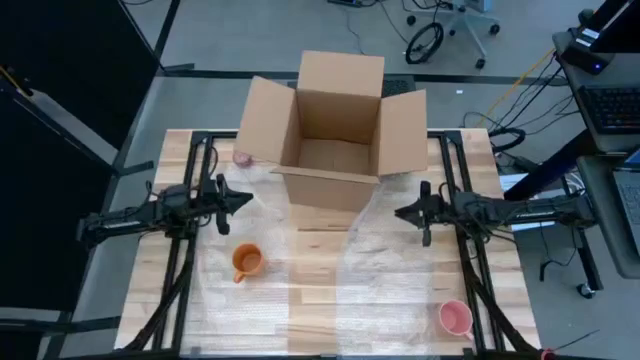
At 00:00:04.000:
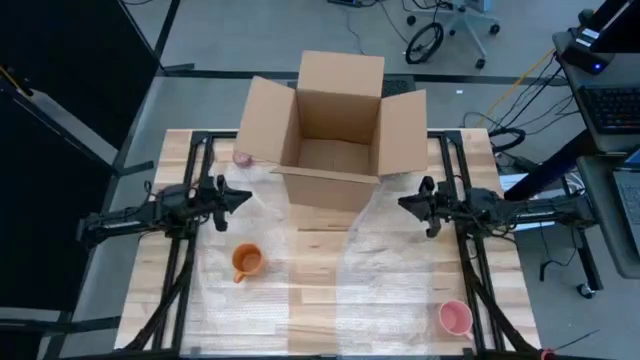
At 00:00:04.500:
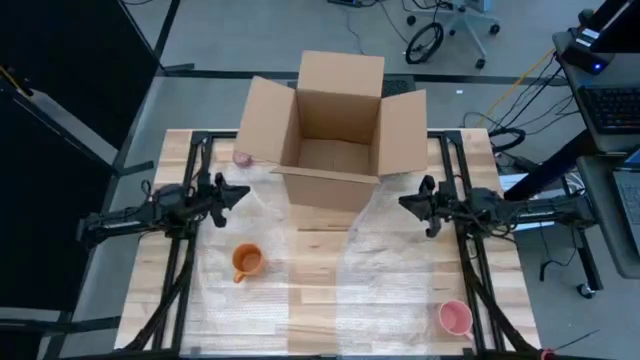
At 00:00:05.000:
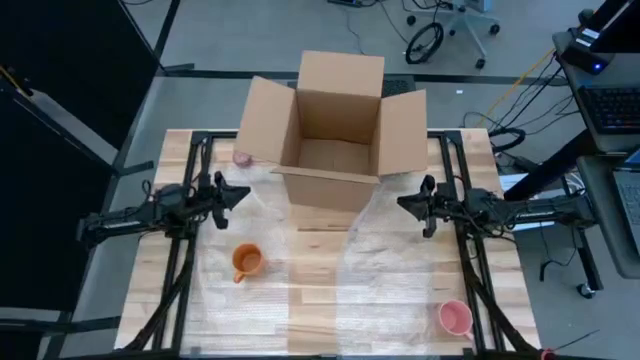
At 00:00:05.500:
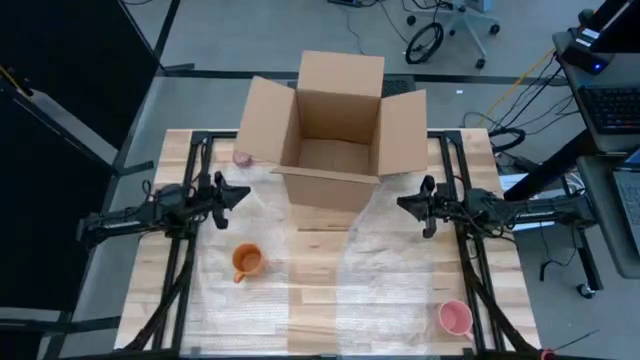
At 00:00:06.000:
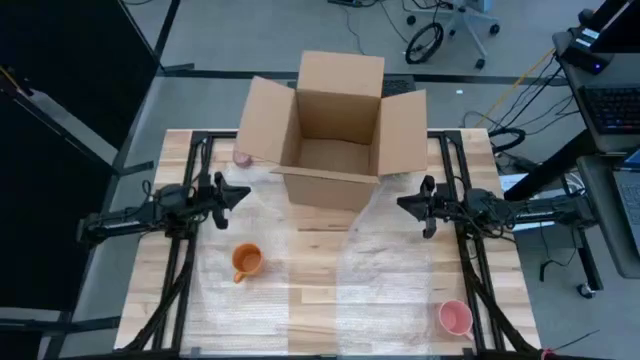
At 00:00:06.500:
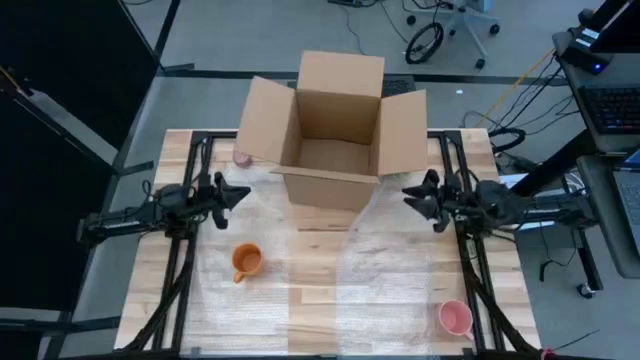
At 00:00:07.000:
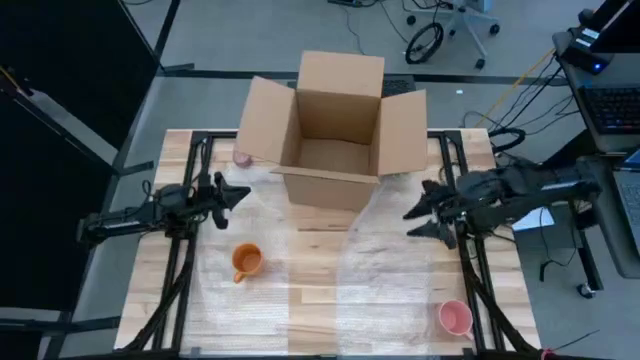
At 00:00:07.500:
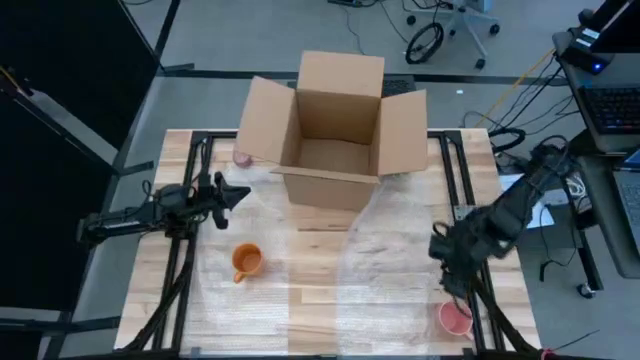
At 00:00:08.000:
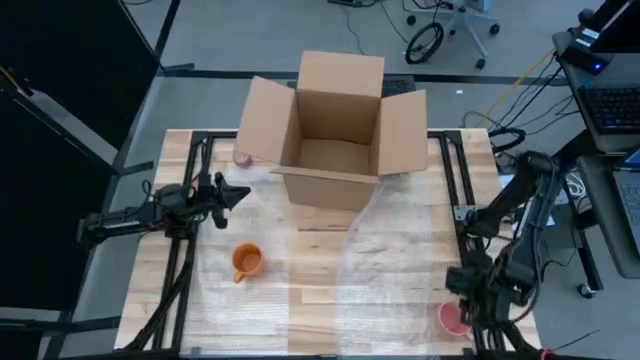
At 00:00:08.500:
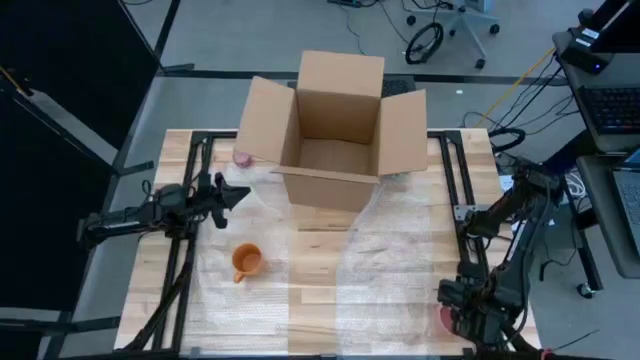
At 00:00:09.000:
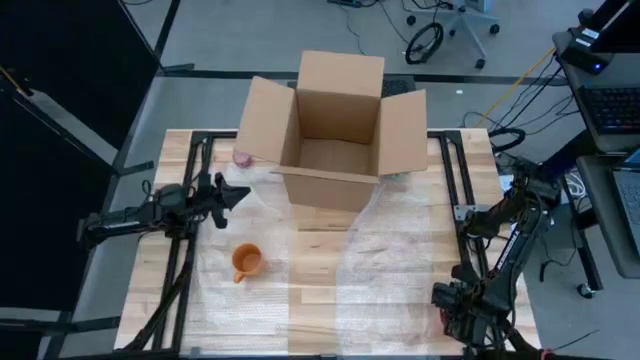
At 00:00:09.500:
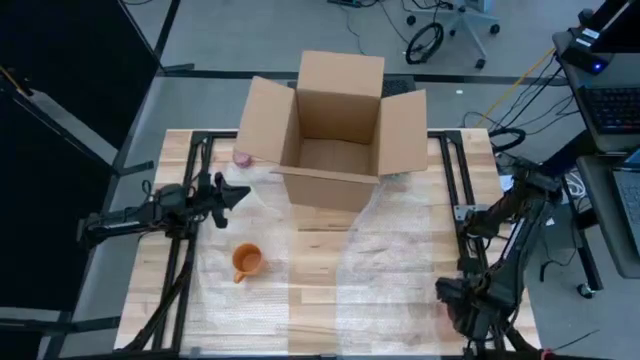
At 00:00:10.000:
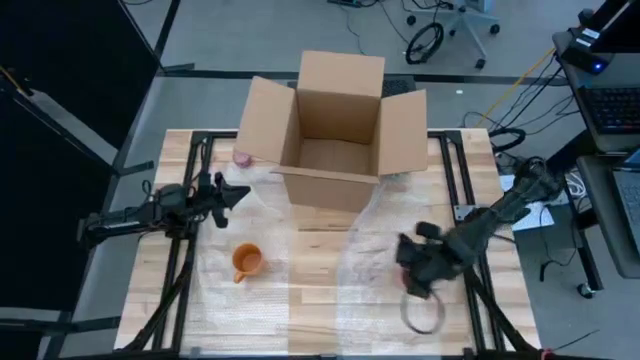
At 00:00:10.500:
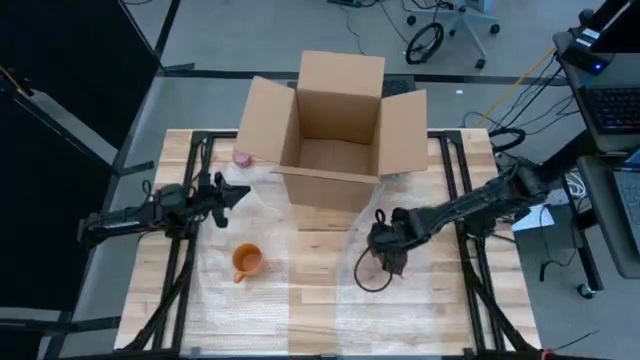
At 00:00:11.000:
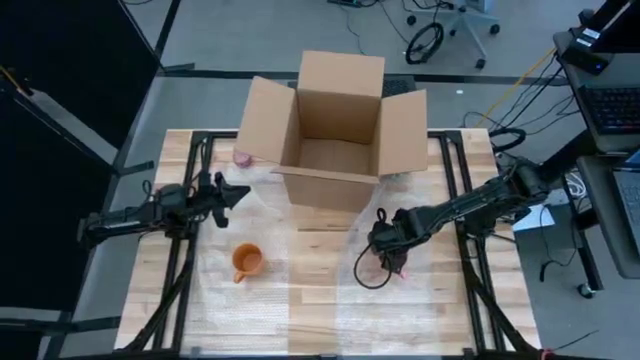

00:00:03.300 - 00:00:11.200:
Task: wrap mug
Put the pink cup into the right bubble wrap

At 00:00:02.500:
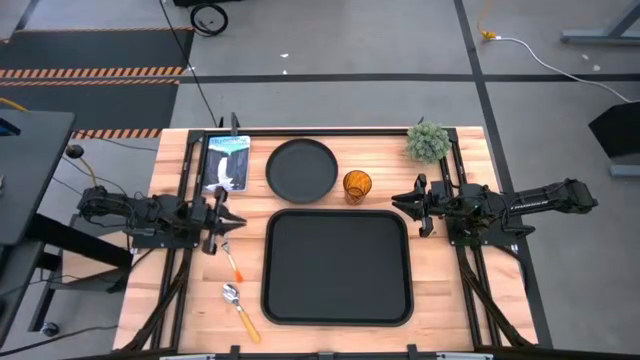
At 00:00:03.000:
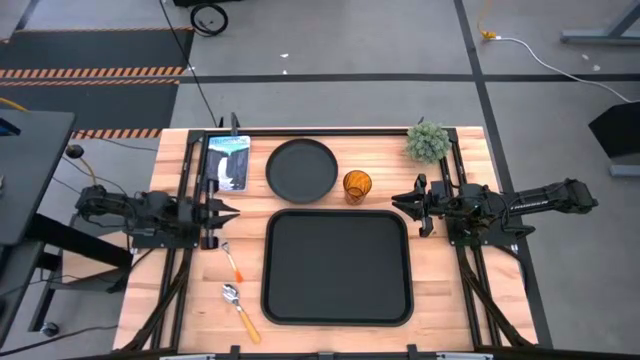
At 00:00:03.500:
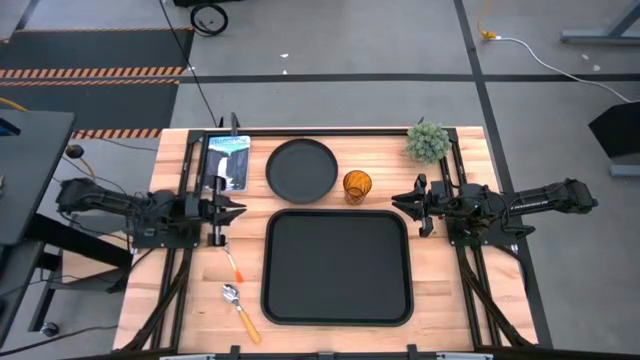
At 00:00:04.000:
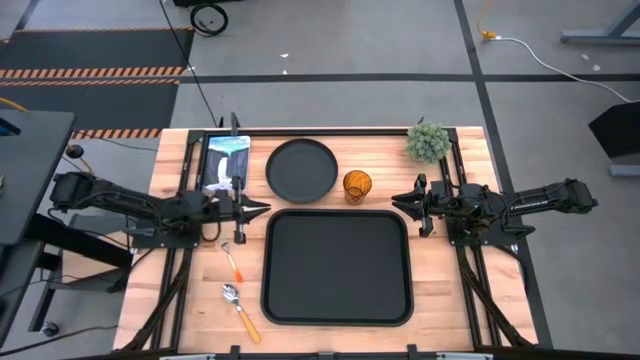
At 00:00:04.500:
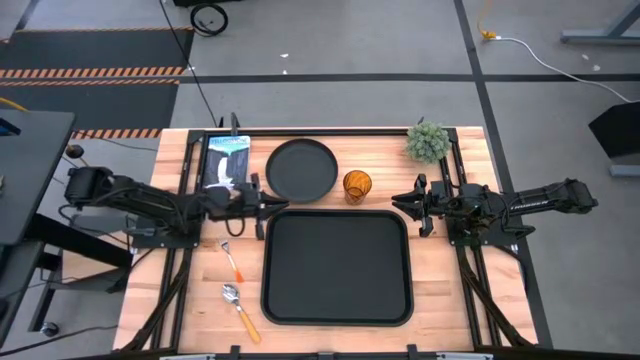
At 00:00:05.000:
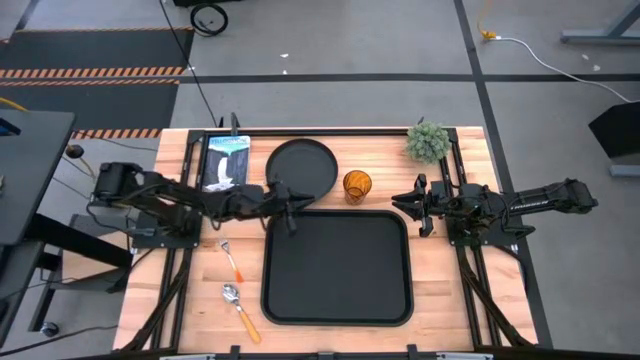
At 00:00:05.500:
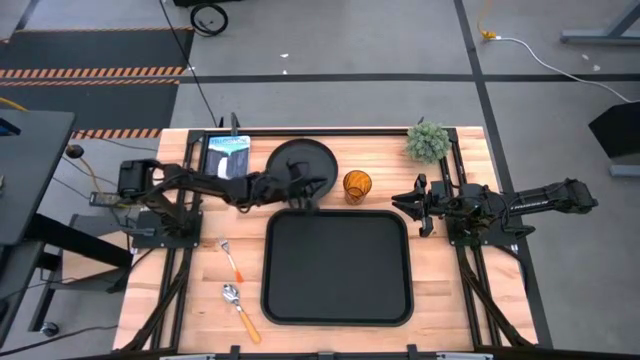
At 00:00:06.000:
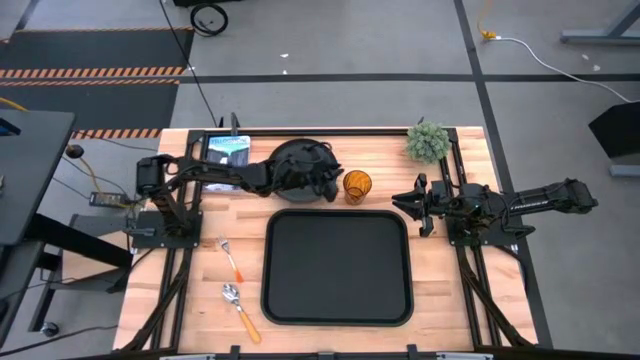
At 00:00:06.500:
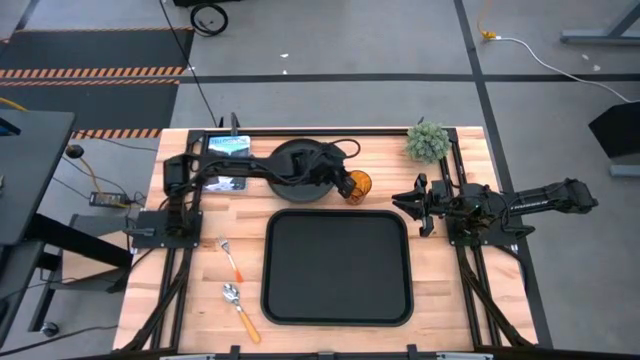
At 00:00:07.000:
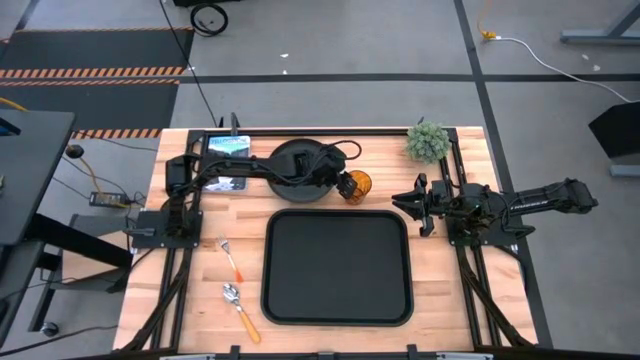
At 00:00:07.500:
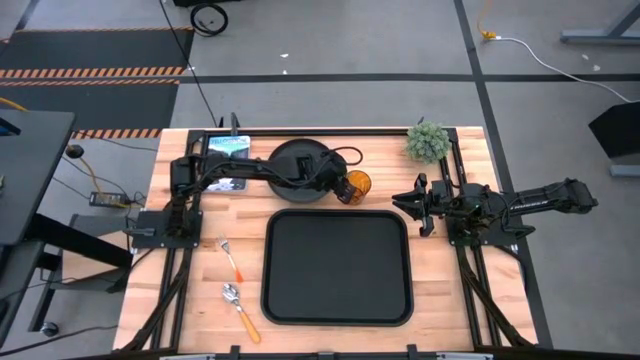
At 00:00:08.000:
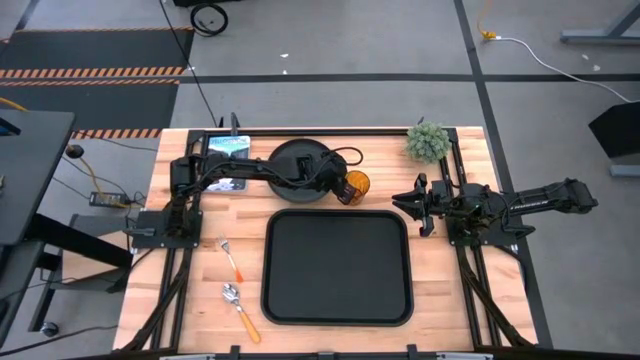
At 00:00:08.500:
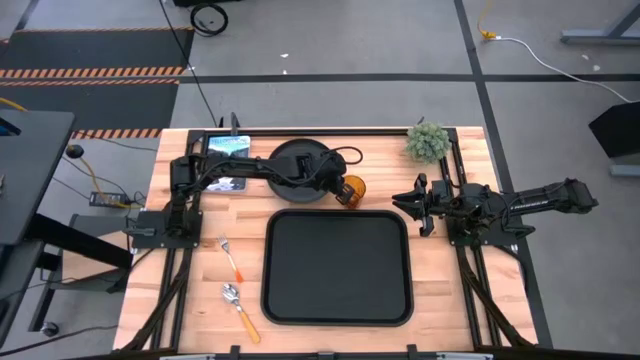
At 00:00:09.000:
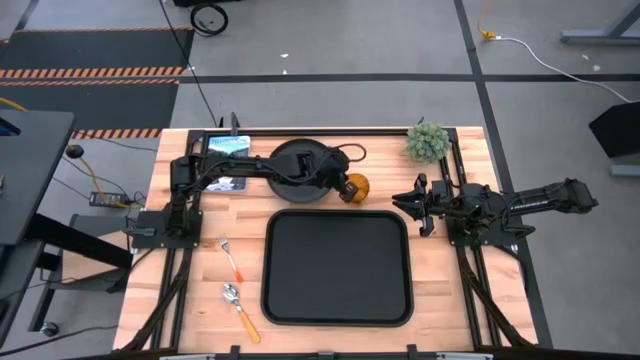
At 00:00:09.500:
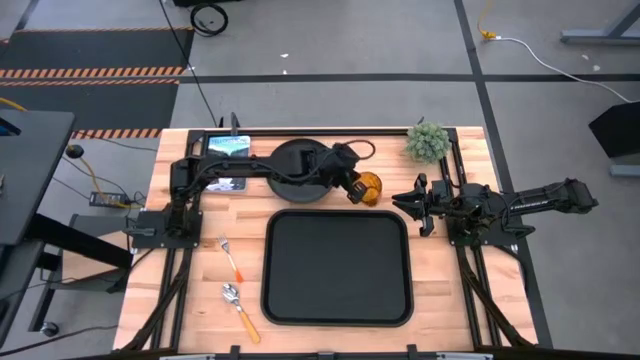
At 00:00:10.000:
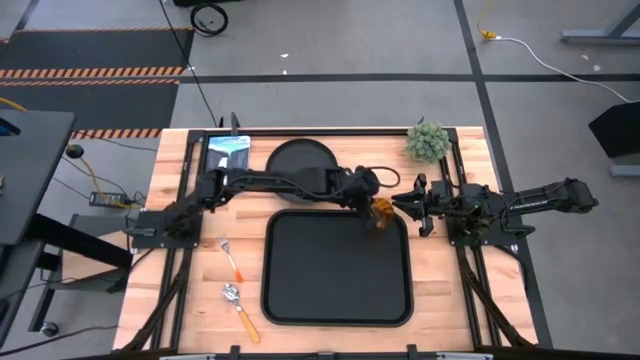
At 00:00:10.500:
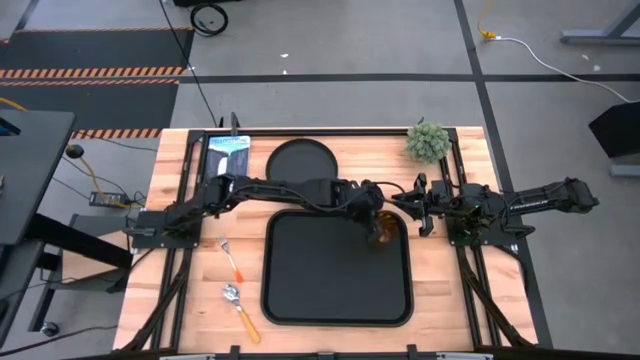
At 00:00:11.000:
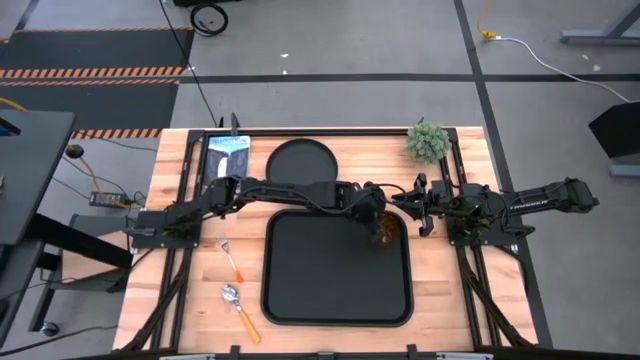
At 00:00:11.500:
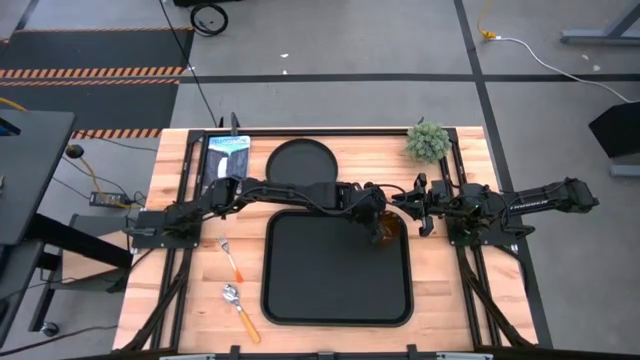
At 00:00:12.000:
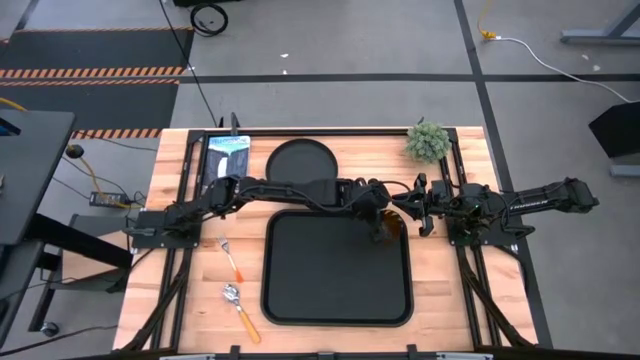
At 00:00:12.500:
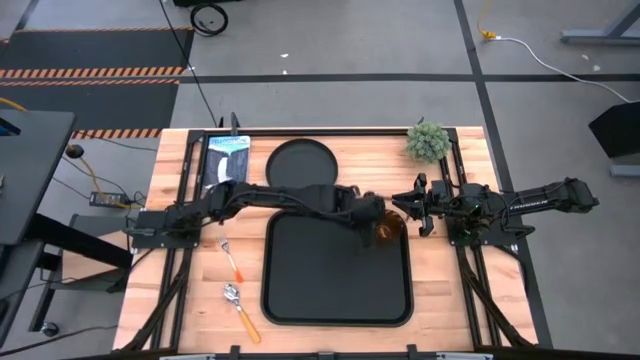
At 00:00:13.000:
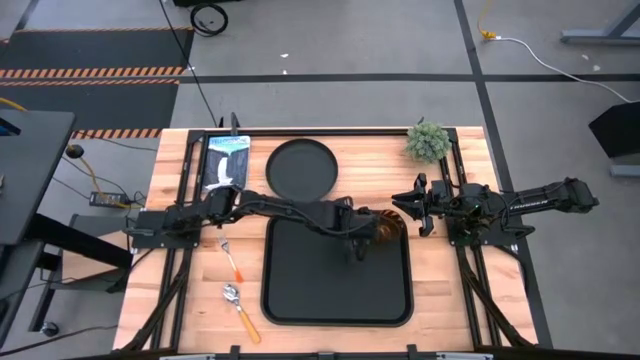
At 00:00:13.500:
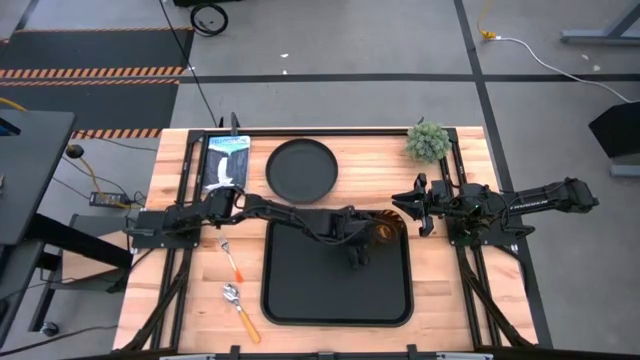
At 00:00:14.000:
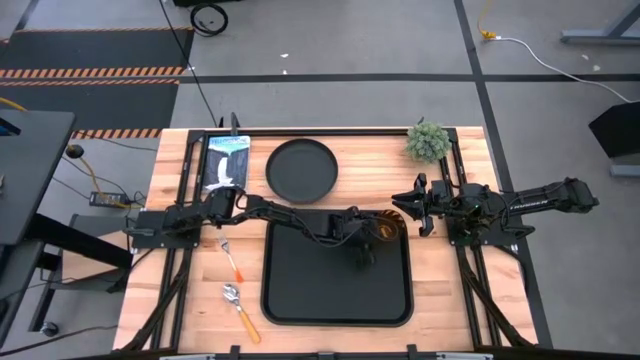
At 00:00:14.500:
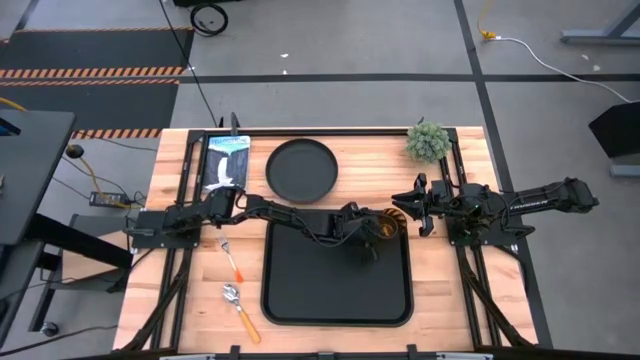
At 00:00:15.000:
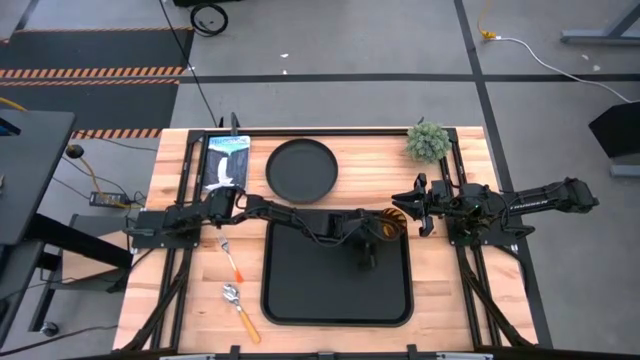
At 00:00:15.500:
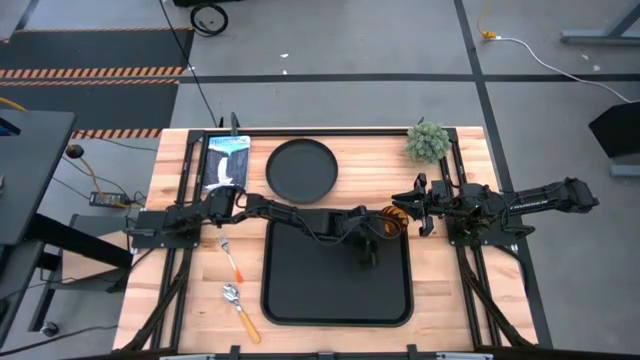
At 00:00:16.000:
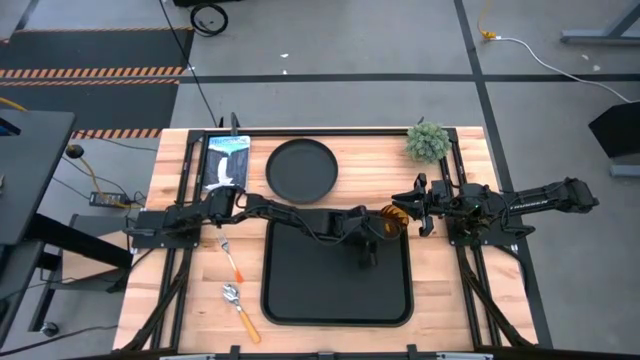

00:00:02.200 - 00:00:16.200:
Task: Pick and place plate/cup/fork/spoon on tray
Put the orange cup on the top right of the black tray
